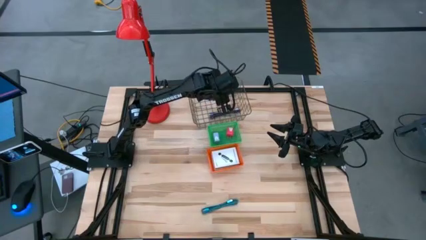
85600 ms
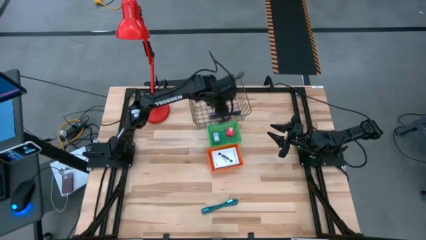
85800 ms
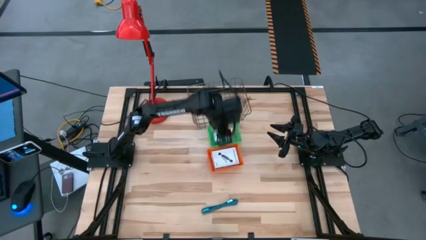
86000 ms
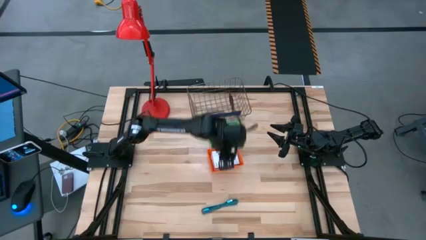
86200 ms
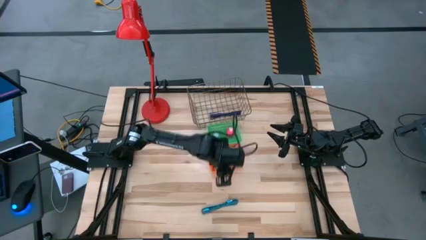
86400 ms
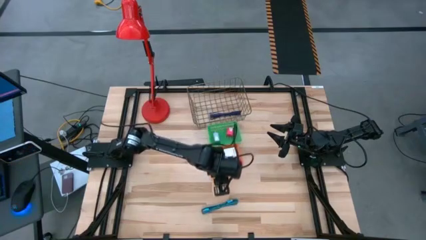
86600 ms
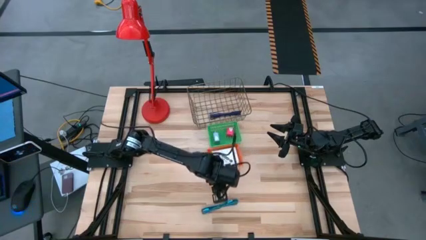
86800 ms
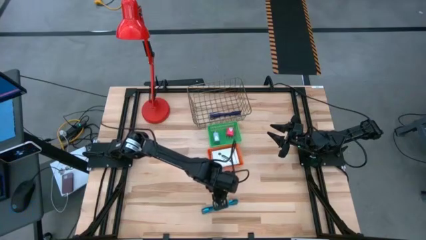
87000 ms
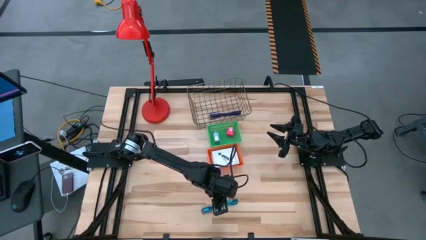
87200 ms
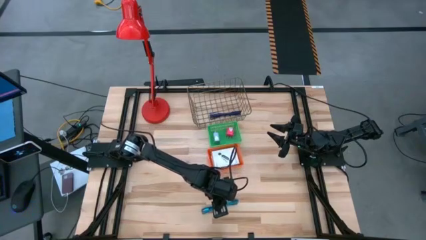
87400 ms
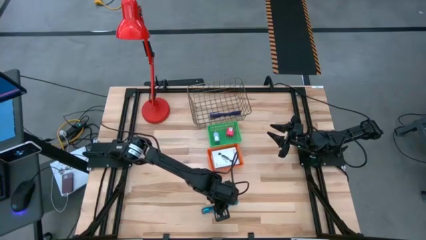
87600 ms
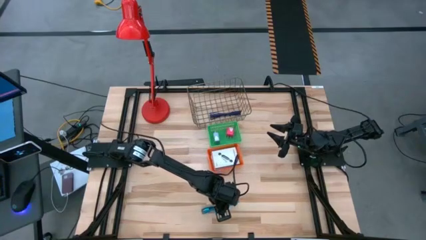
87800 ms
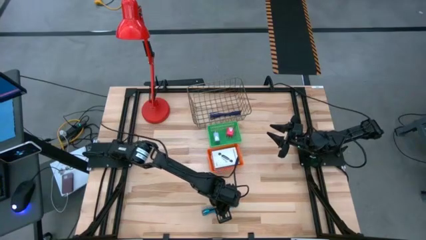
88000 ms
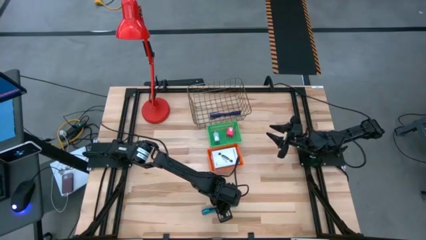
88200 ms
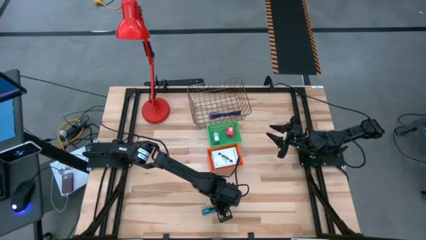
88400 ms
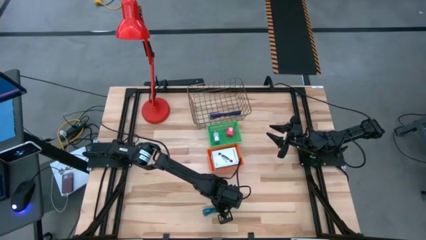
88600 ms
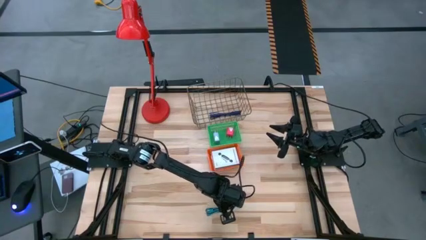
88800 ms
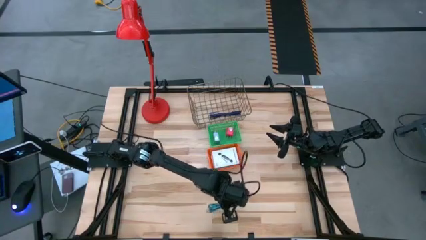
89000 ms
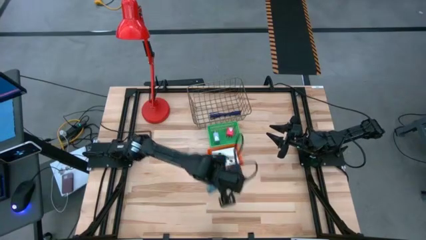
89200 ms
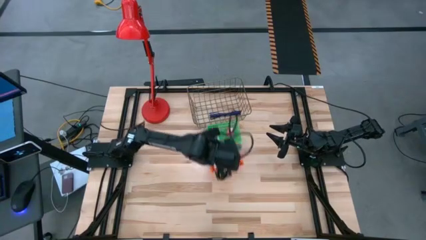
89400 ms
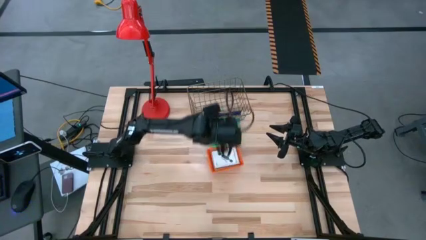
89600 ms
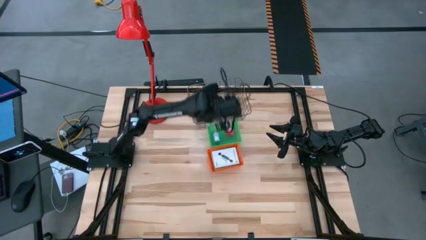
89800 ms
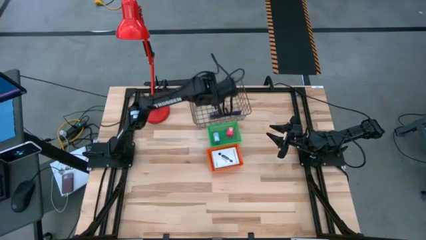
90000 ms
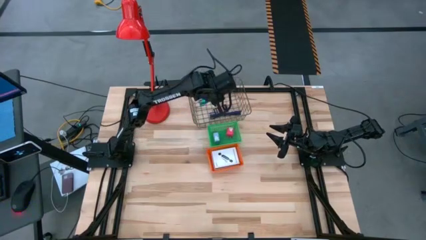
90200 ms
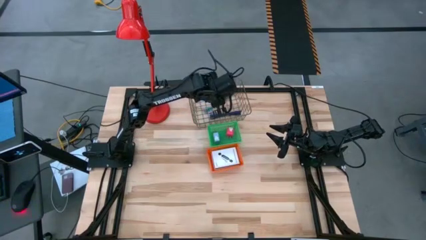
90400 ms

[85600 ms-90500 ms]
Task: Pick and place items into bin
Put the light blue charger cable into the wire basket

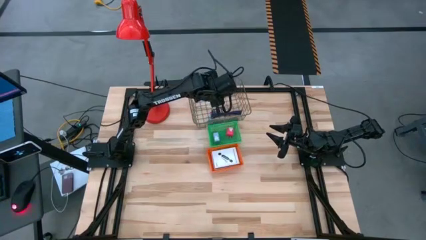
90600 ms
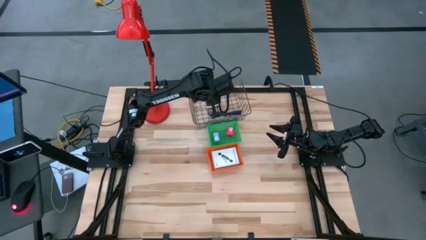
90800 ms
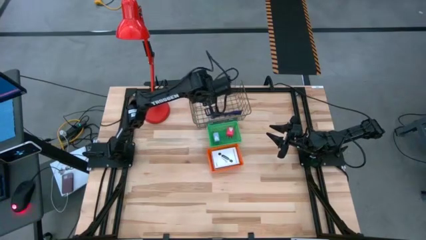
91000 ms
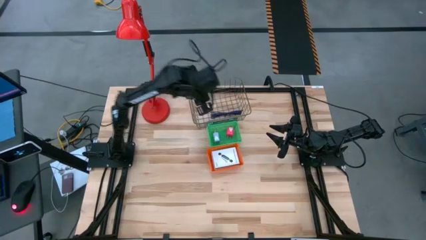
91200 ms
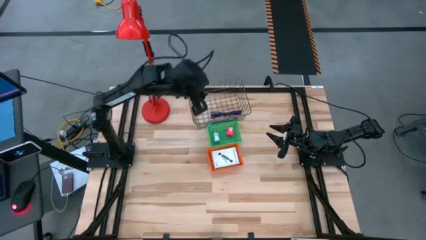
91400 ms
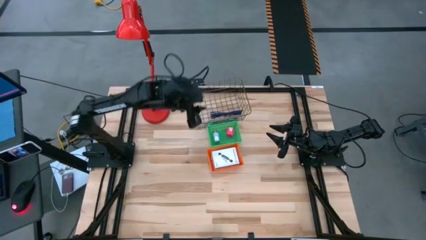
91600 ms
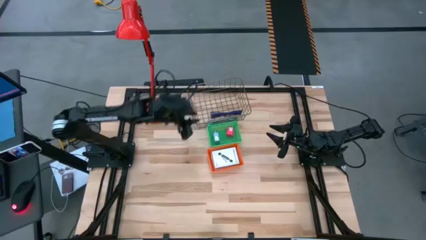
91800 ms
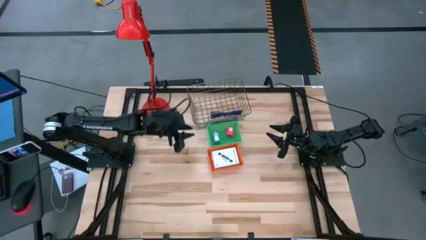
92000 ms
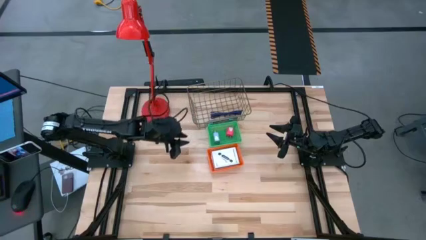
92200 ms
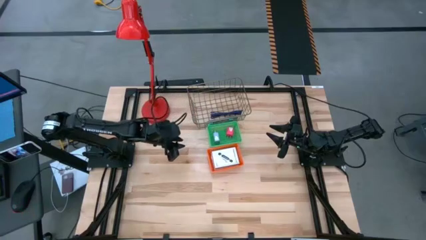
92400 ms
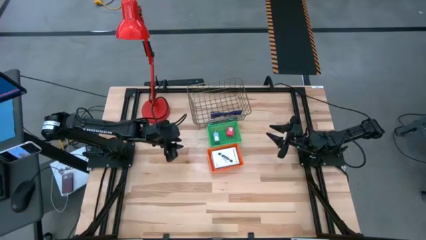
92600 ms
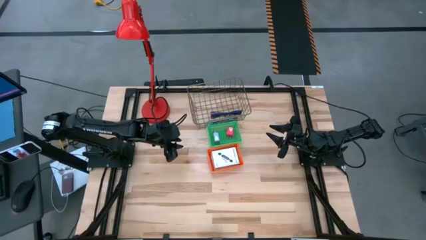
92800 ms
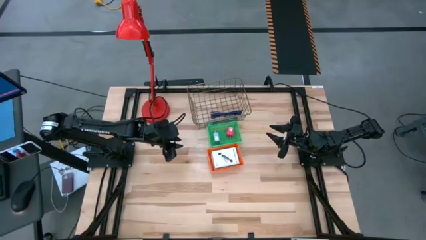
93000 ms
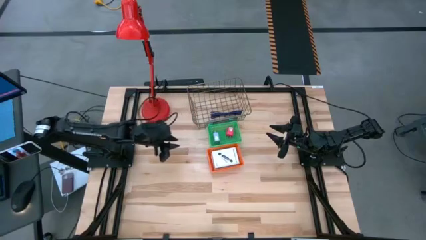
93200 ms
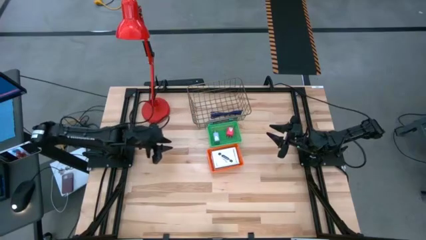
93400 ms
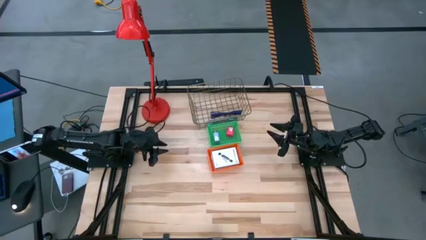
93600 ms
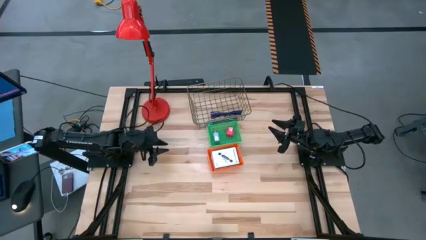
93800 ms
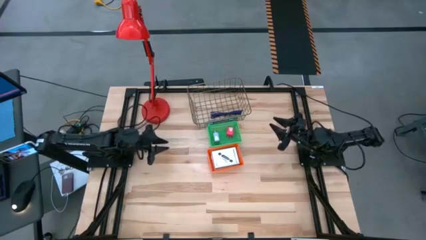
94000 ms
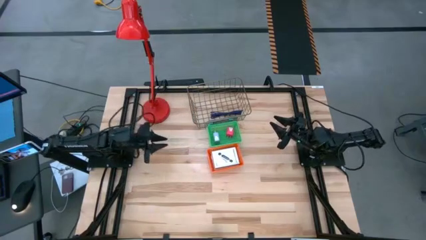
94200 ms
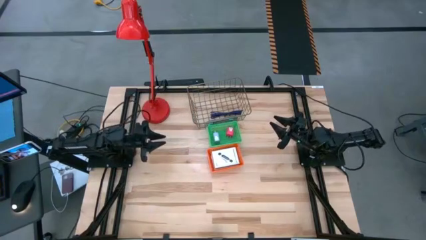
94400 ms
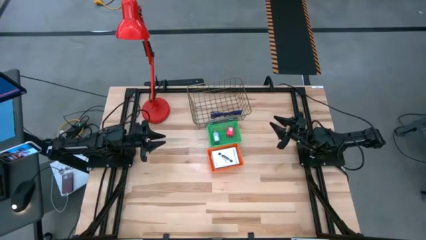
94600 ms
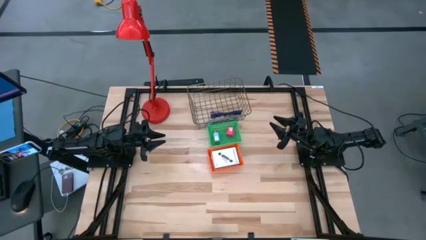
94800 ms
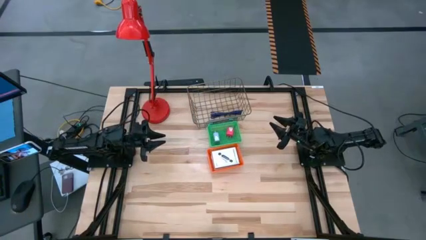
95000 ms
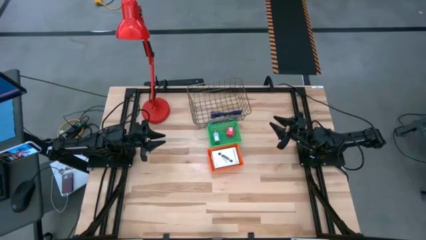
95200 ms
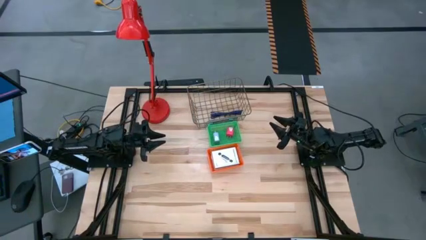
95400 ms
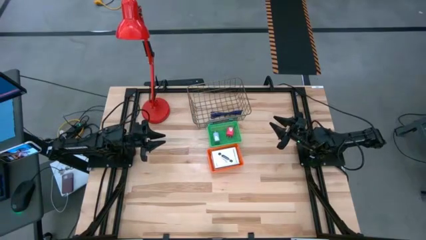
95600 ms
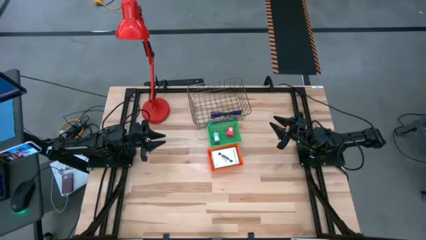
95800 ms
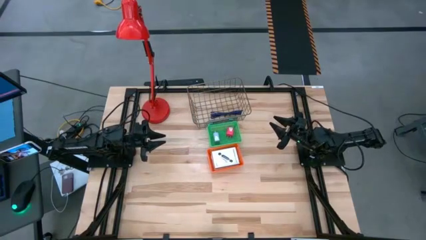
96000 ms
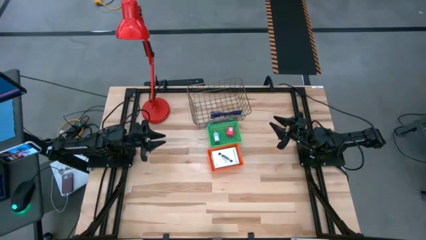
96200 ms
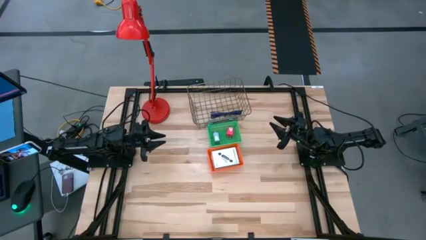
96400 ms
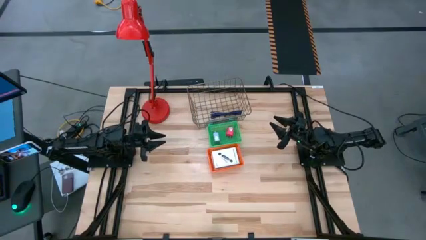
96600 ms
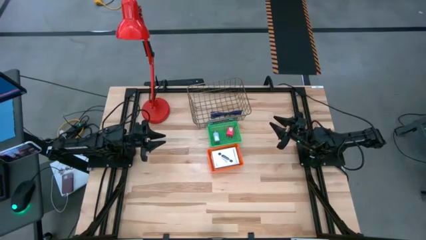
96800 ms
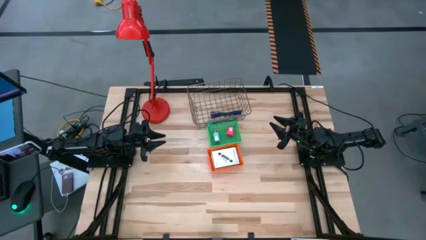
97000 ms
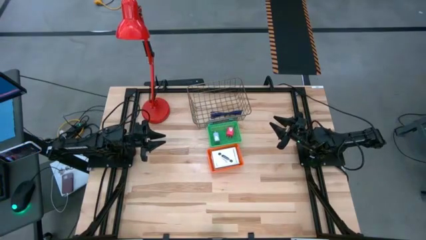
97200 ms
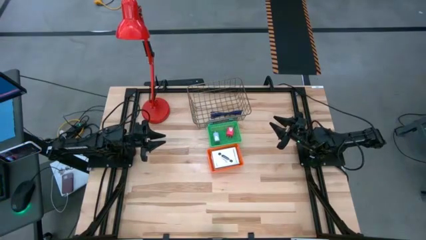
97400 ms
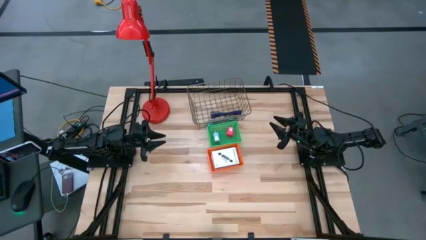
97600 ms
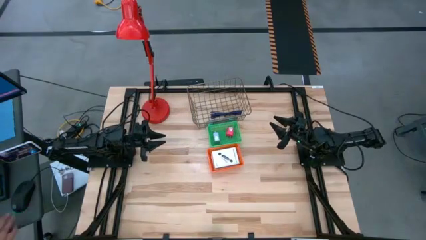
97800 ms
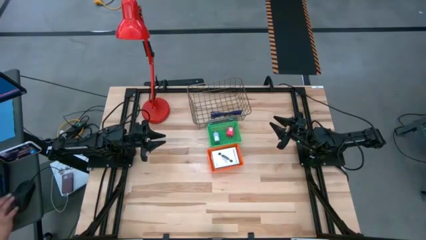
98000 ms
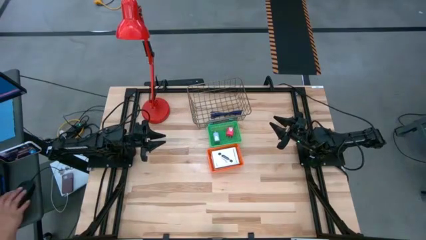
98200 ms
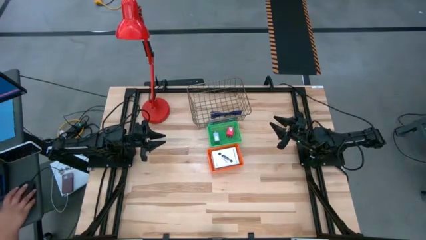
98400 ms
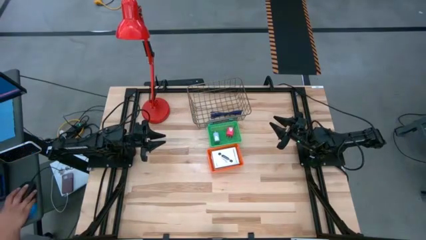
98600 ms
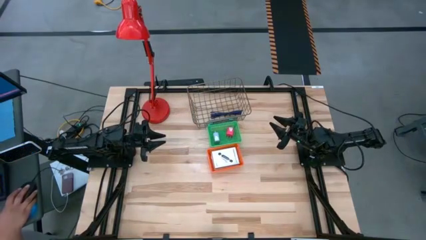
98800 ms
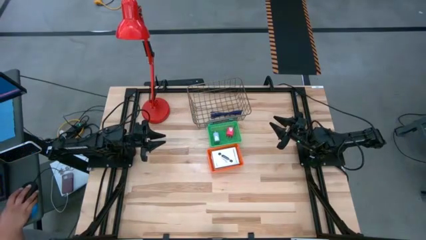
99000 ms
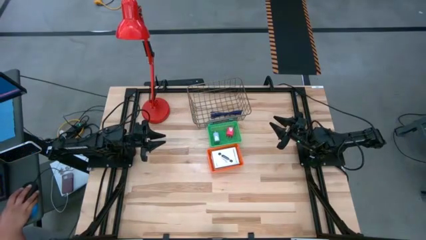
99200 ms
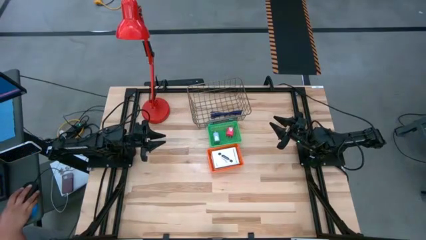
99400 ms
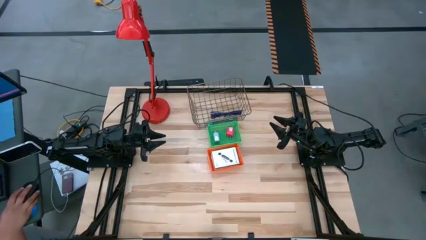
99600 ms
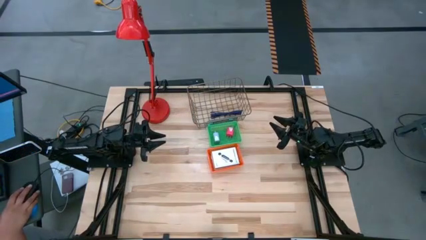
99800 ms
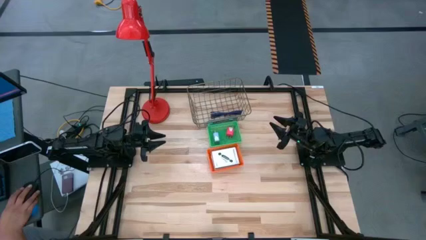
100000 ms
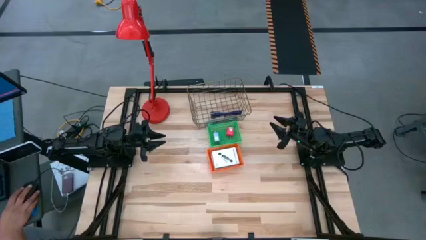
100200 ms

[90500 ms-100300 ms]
Return to Home Position

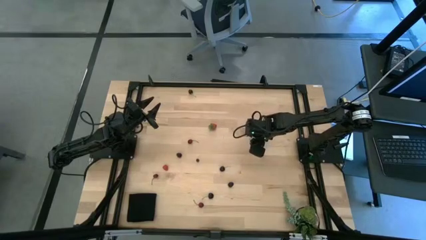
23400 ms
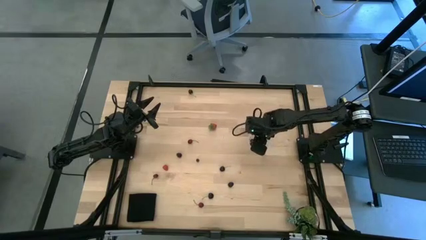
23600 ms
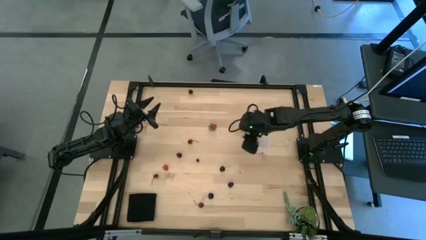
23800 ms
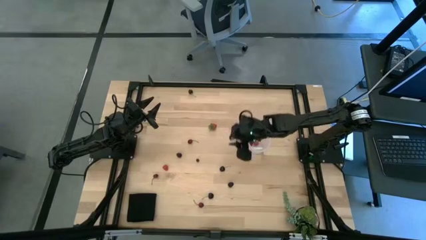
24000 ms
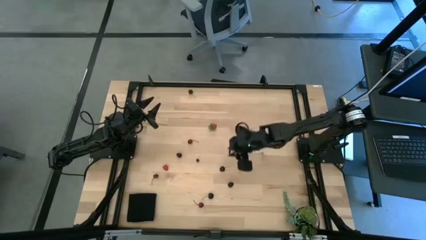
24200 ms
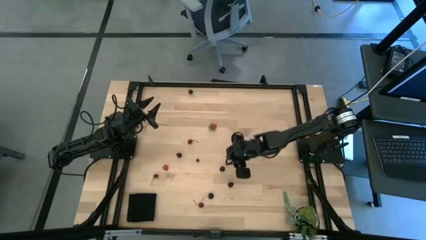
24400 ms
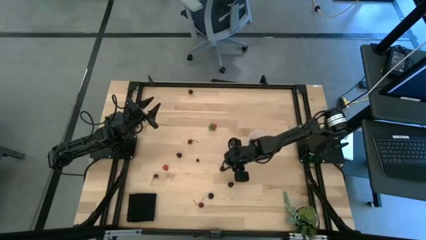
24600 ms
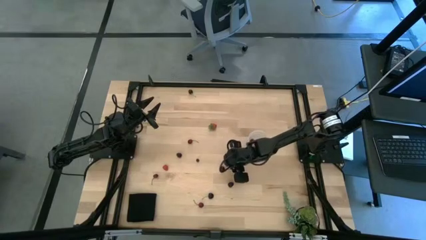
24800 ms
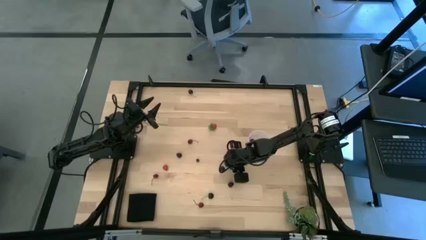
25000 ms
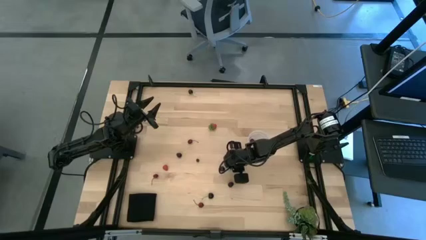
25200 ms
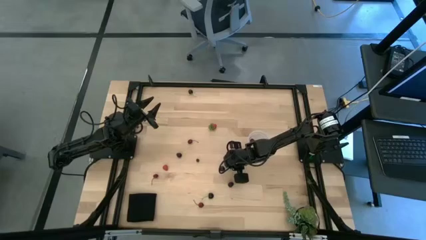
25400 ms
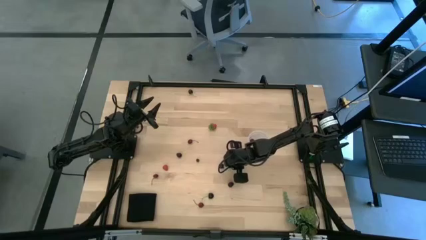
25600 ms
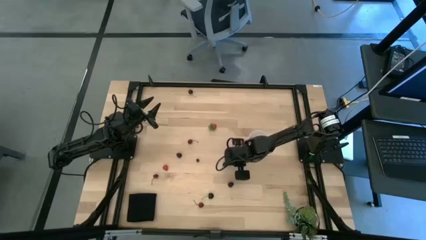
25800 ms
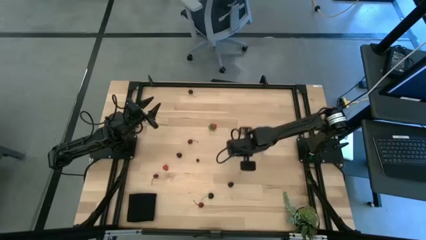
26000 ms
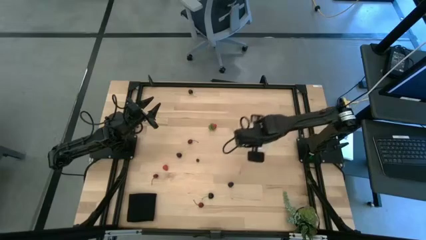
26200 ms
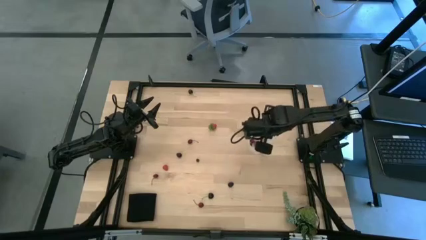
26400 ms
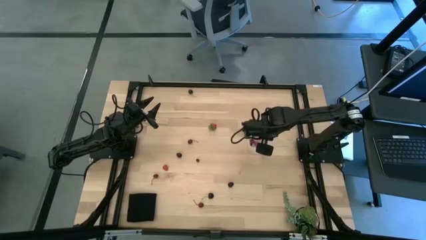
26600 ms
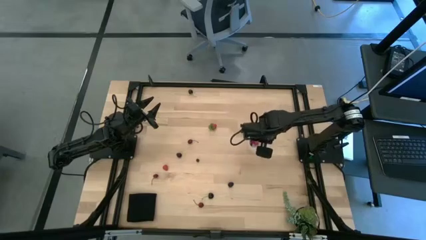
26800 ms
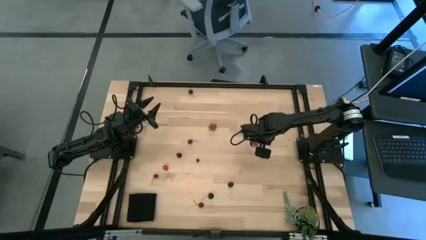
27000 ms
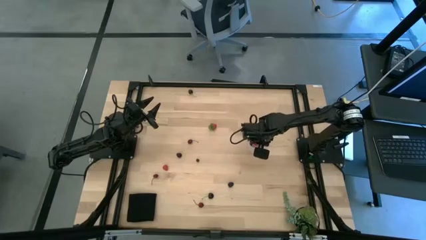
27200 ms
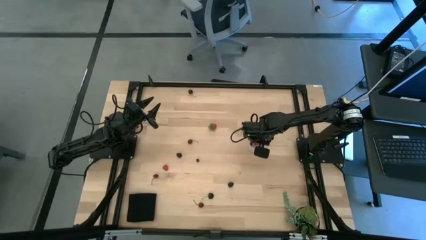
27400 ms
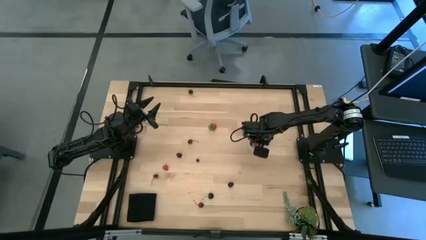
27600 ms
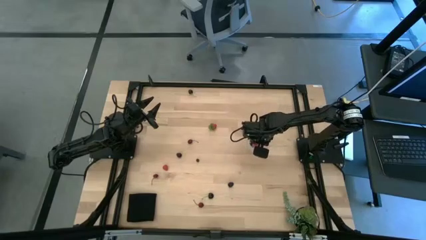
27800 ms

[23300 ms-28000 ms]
Task: Pick and placing Produce into tupperware
Put the black cherry into the transparent bucket
